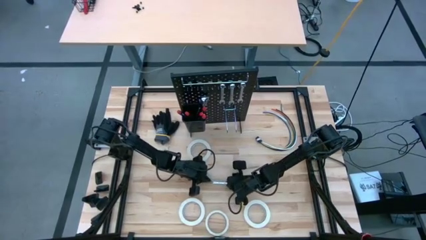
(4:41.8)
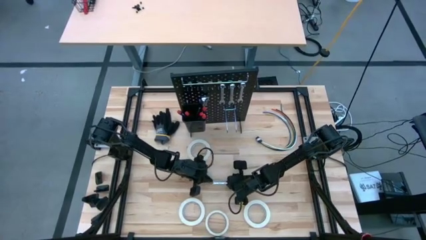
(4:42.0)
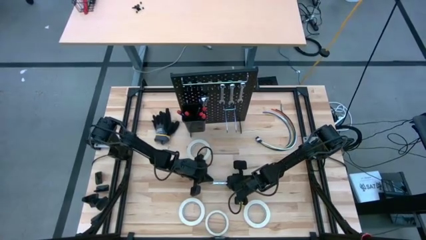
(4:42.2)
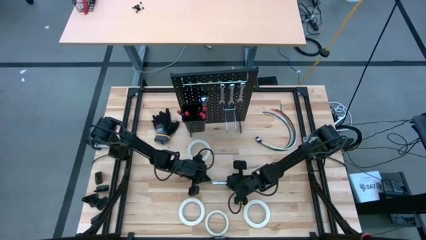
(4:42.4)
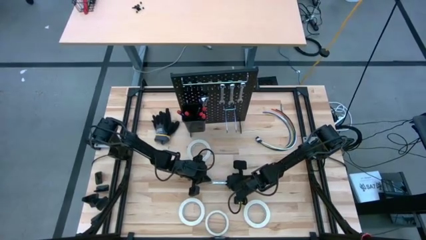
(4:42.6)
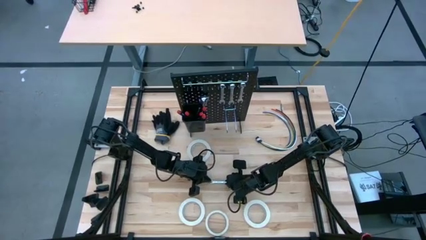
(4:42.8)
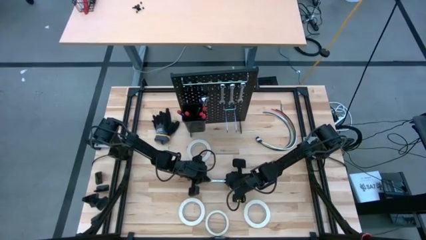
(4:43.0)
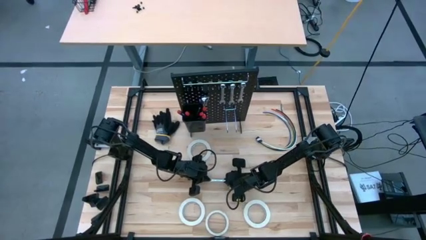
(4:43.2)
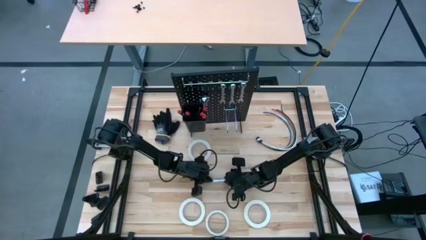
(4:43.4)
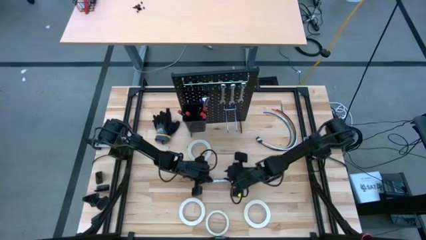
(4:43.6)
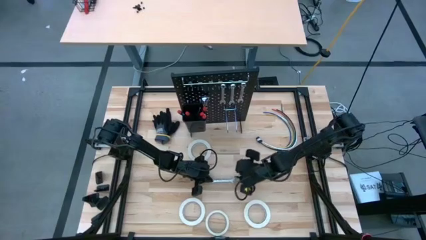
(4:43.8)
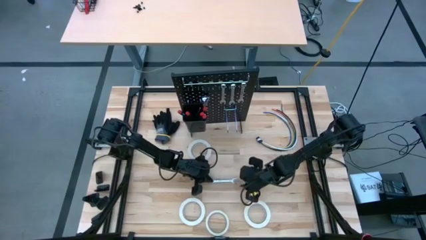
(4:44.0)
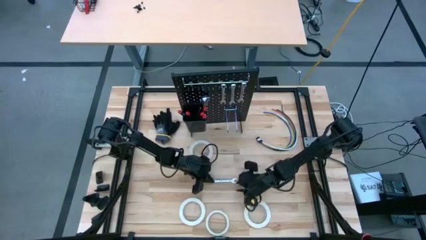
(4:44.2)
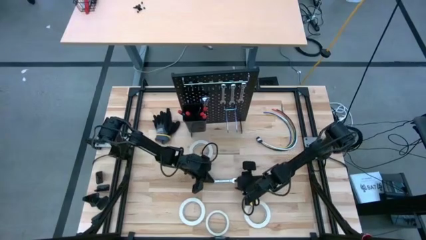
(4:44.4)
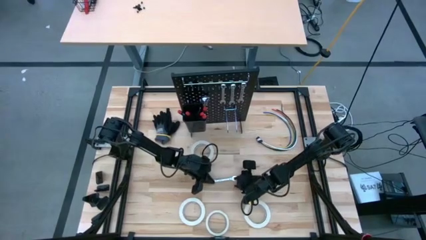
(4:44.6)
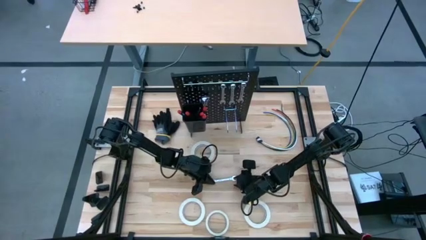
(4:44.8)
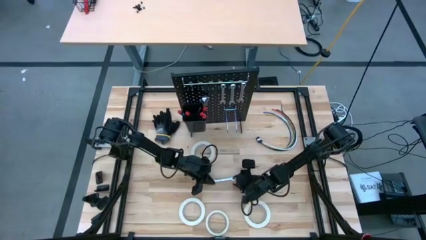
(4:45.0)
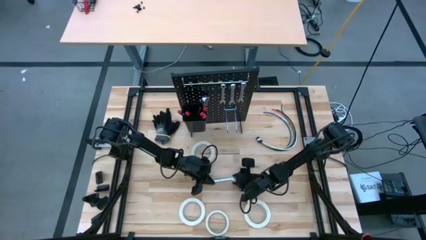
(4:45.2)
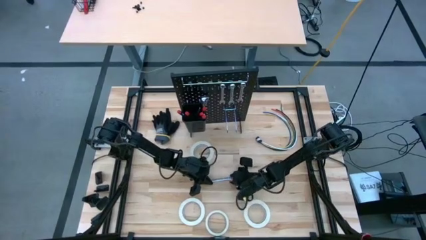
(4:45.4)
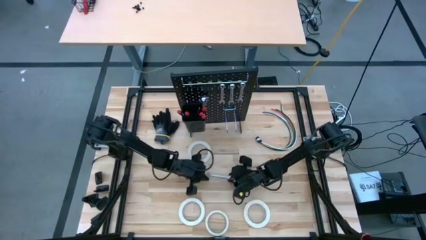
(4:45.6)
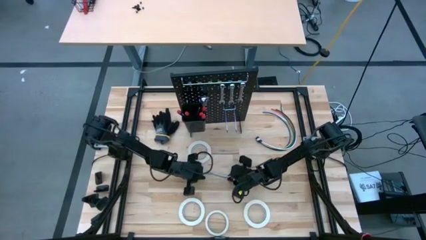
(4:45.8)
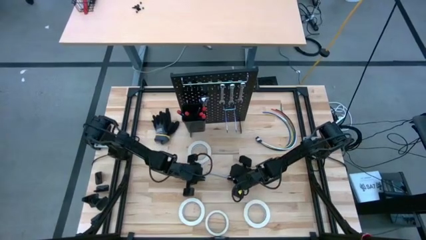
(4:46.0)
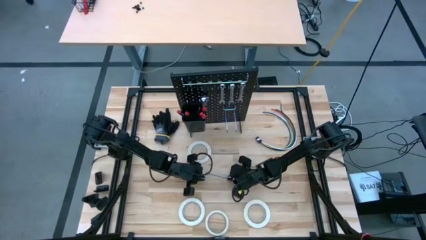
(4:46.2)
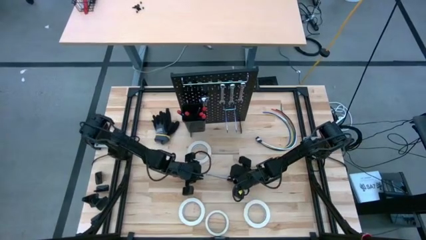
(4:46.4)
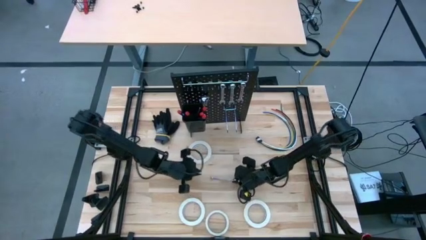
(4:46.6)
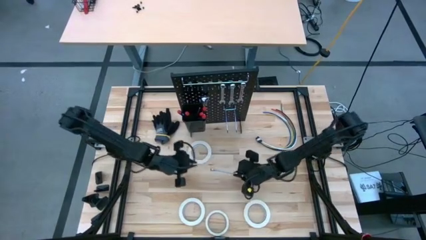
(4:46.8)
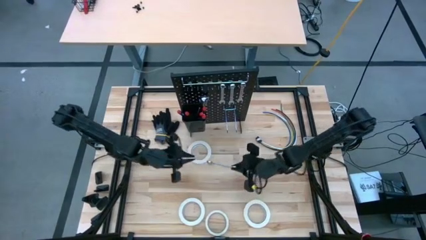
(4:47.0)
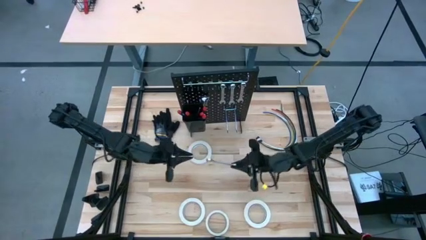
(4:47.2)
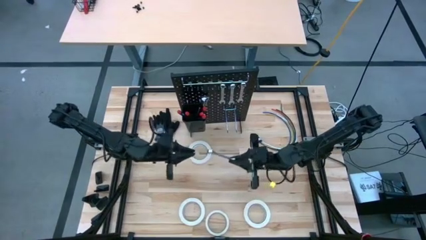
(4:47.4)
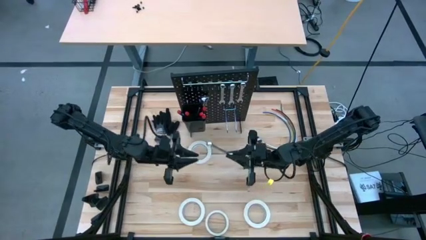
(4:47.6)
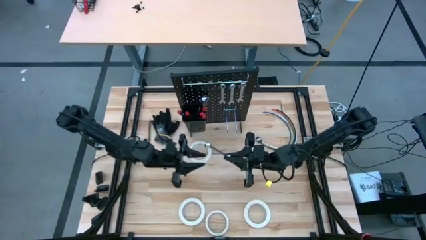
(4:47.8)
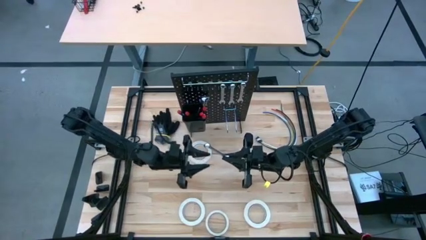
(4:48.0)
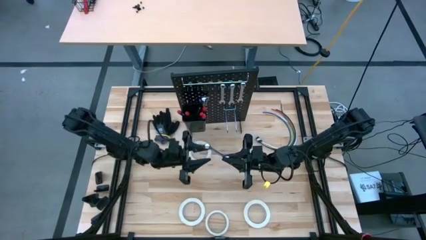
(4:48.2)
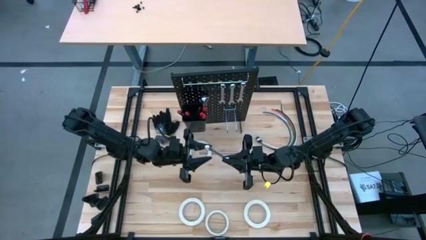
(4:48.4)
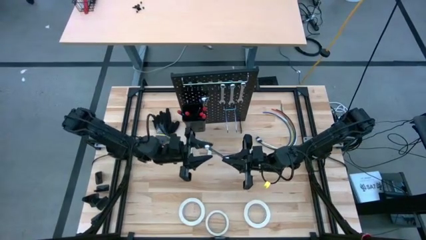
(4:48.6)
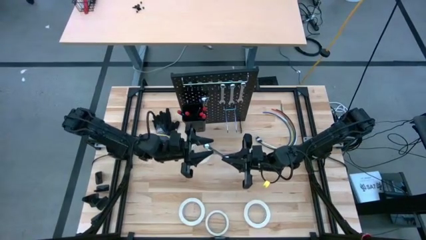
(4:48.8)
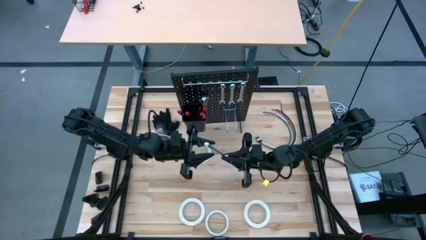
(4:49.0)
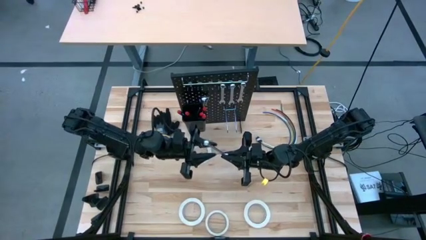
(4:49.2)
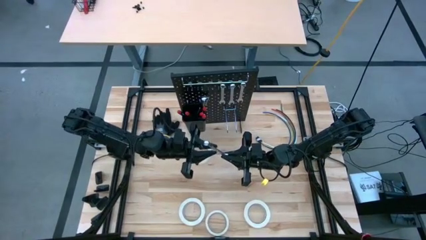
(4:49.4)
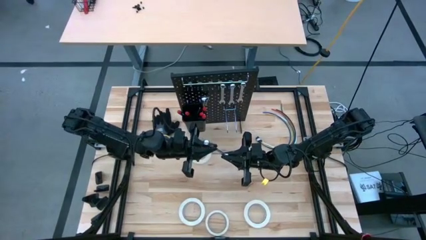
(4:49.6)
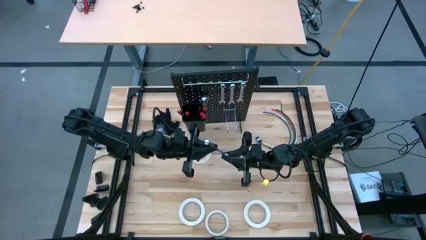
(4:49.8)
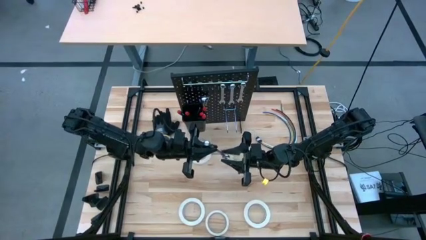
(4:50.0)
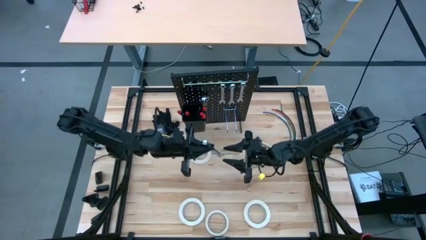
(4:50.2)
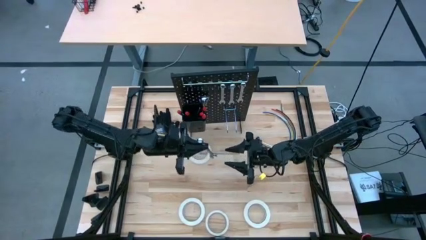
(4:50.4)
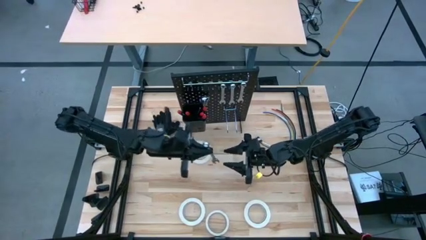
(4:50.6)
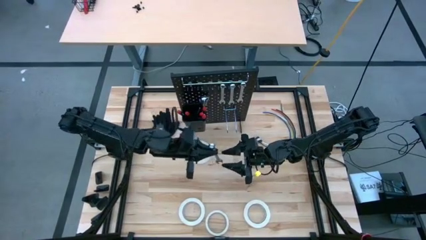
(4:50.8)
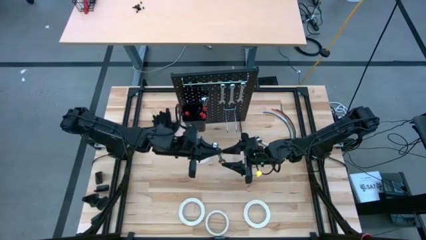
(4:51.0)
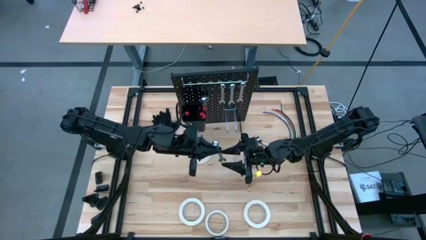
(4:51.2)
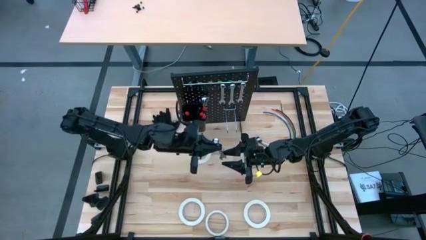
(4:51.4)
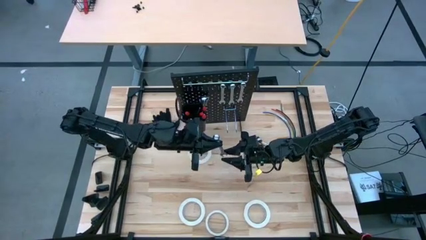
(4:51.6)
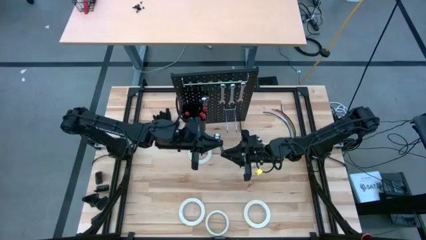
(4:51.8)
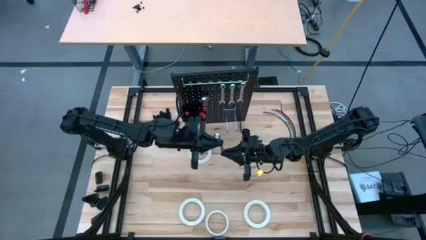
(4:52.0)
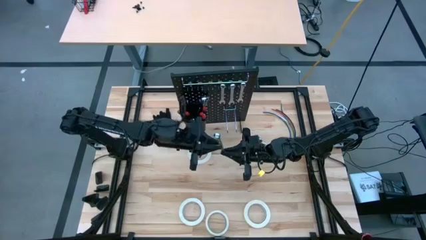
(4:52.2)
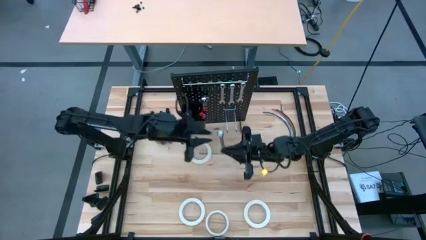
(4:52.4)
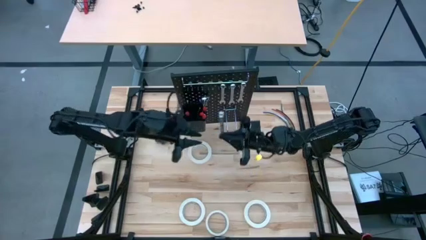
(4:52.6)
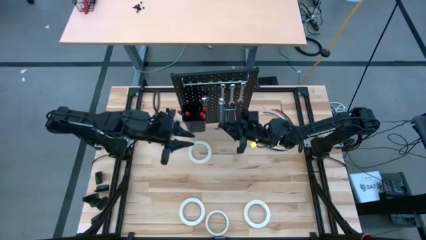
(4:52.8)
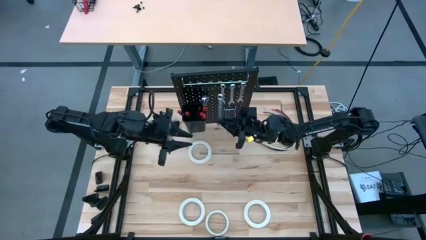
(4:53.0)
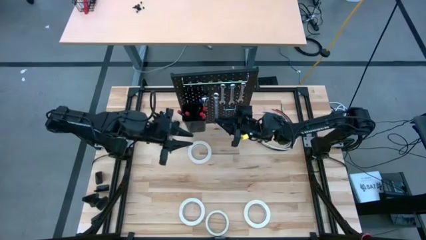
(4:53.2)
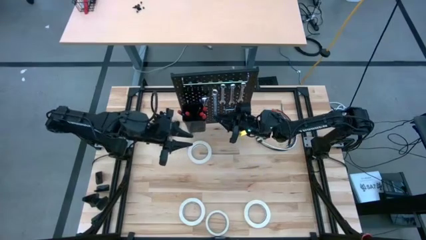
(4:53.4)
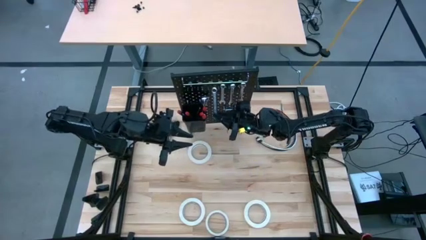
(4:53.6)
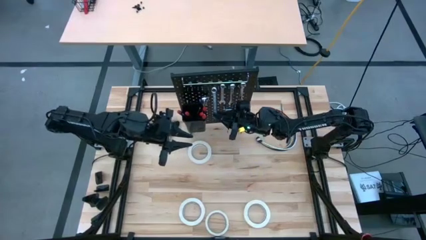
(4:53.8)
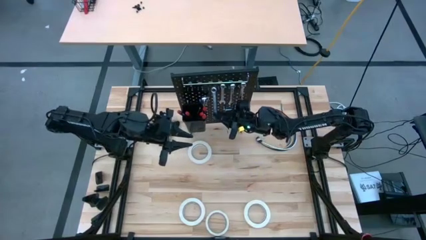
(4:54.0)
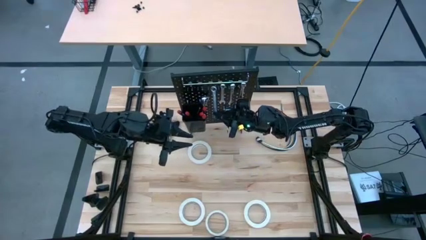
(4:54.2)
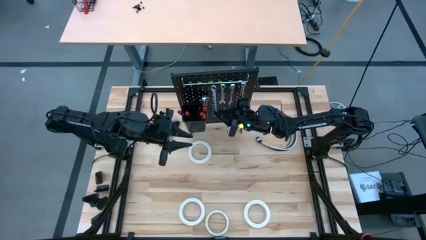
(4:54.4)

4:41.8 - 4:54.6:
Task: Hang tools onto peg board
Hang the silver wrench on the peg board

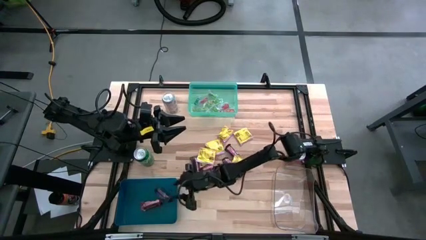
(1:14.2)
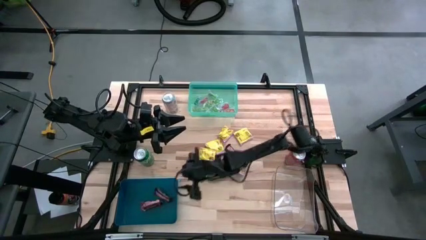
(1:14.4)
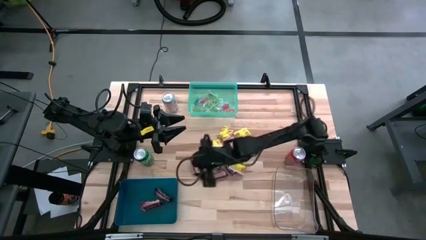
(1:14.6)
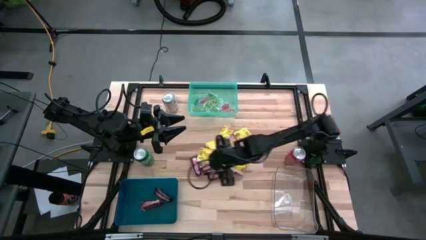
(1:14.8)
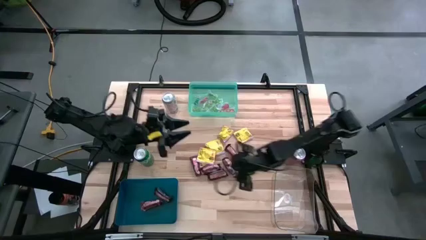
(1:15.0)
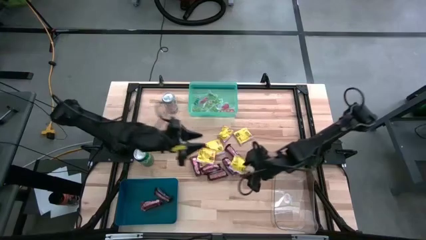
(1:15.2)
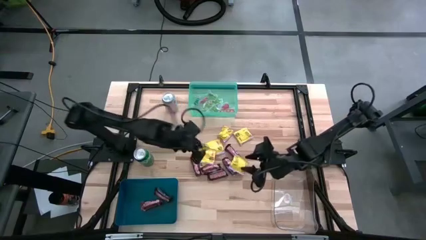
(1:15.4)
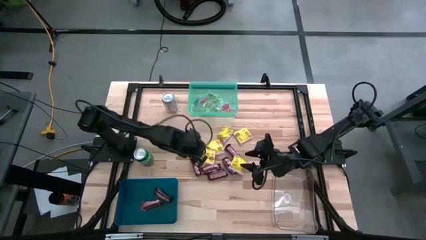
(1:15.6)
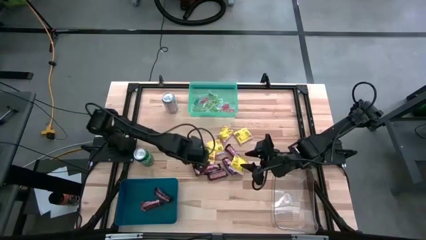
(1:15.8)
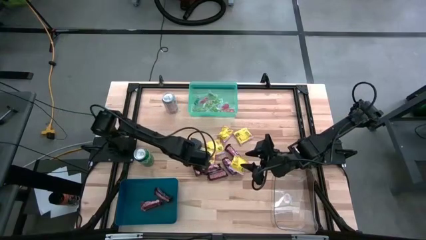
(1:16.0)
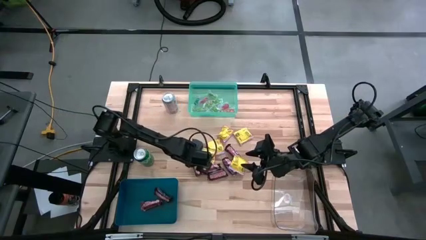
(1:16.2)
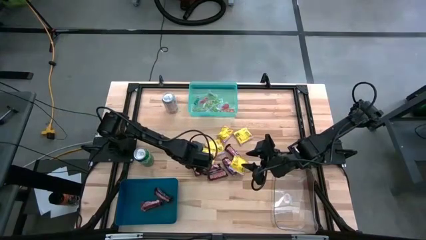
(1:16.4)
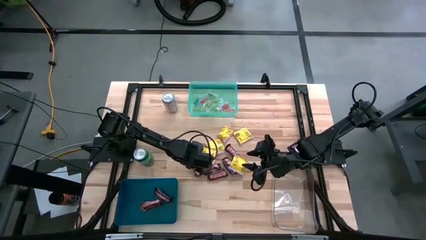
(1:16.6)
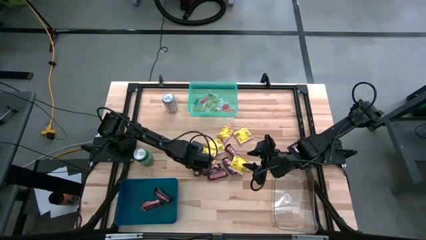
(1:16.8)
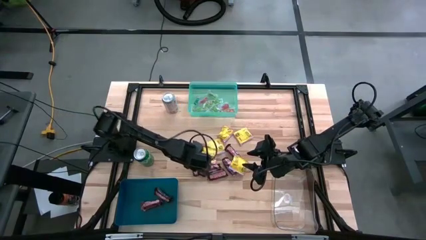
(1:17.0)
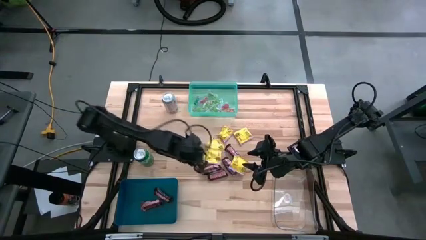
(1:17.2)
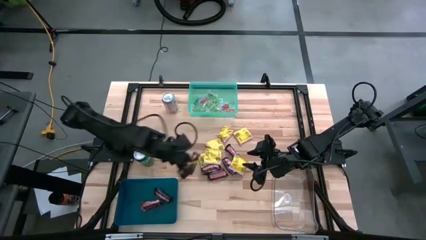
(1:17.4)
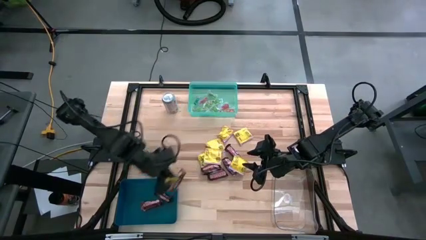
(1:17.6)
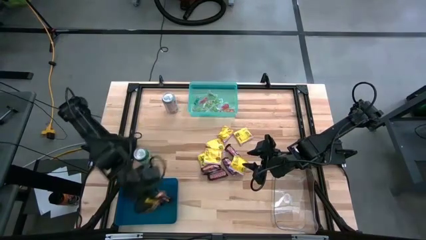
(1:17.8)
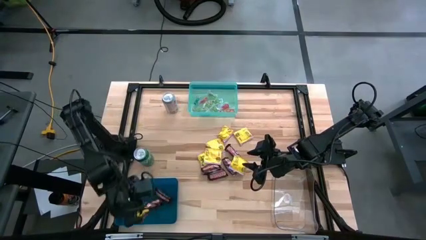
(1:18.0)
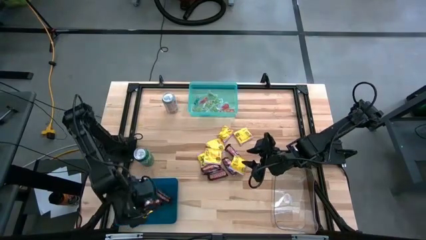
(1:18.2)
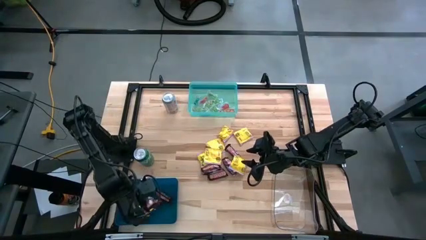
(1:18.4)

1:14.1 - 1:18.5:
Task: Sort candy
Put the brown chocolate into the dark blue bin
